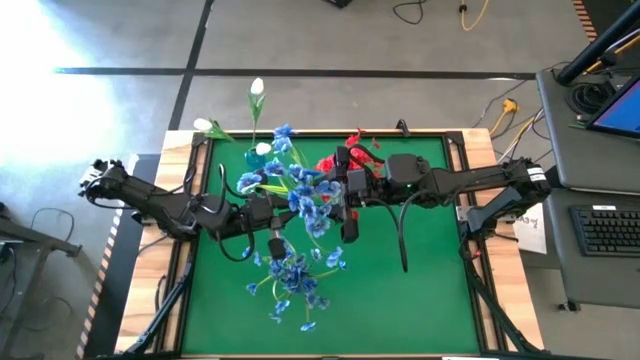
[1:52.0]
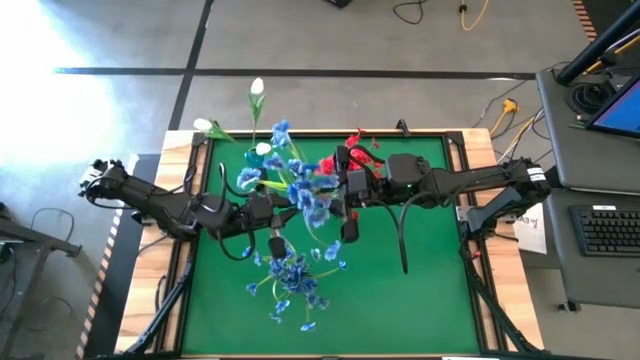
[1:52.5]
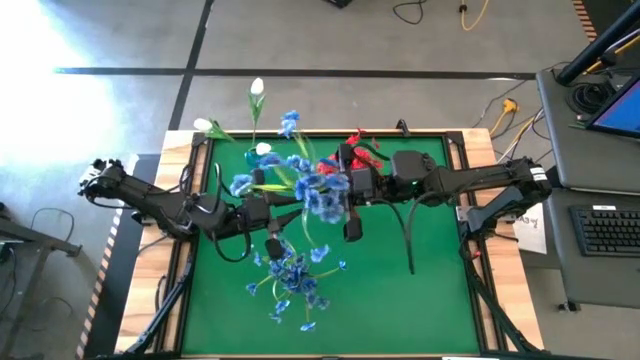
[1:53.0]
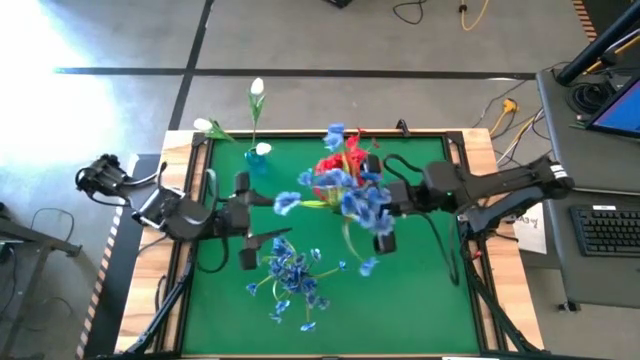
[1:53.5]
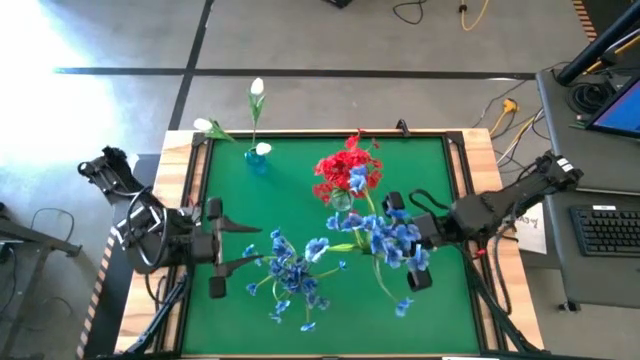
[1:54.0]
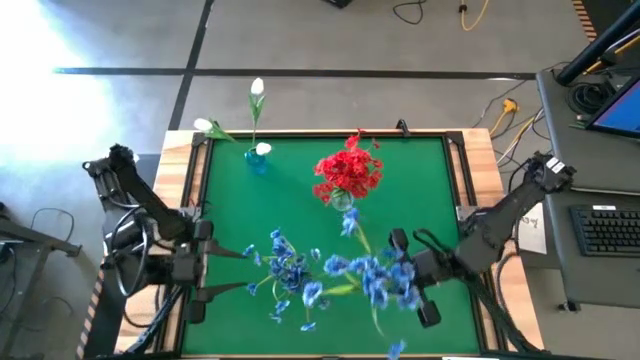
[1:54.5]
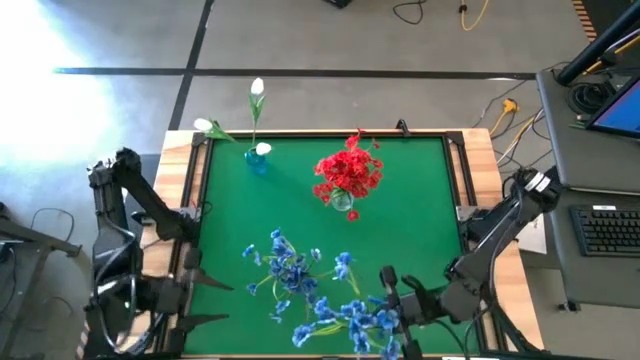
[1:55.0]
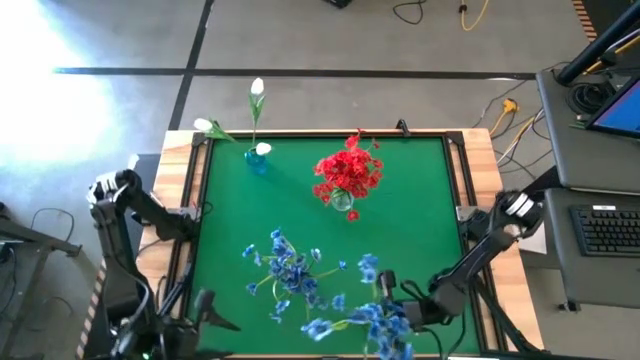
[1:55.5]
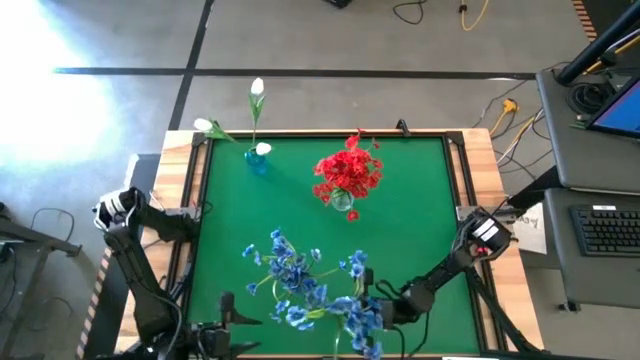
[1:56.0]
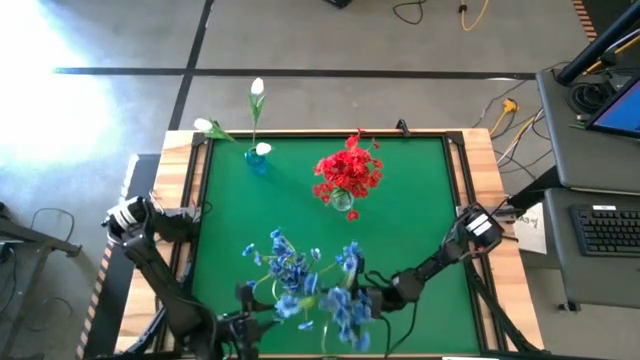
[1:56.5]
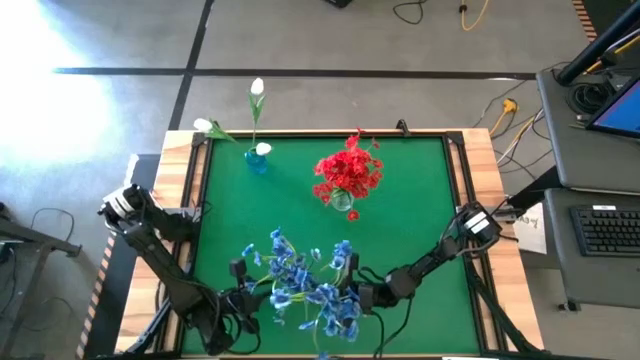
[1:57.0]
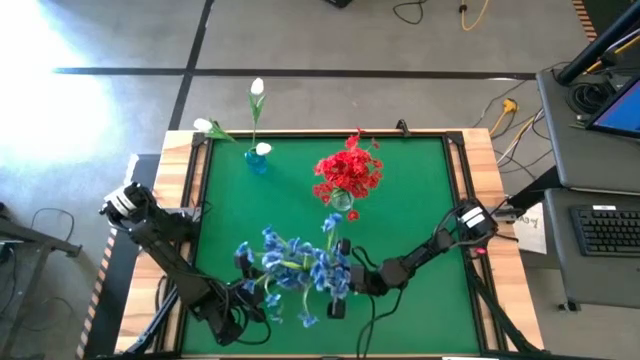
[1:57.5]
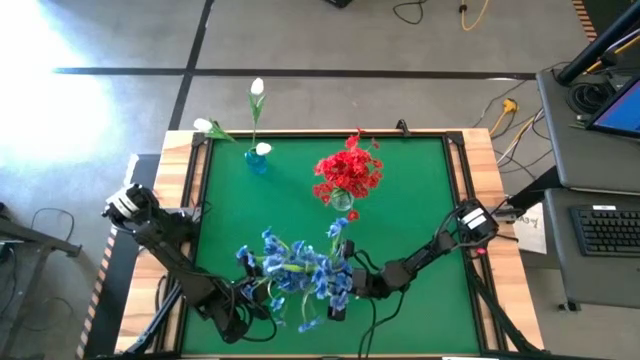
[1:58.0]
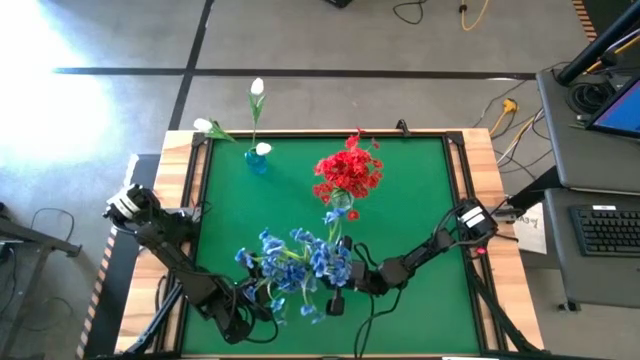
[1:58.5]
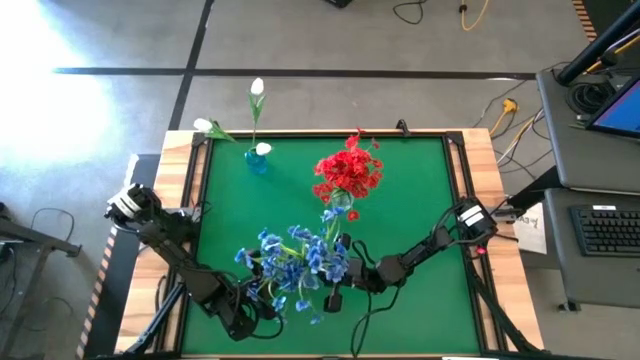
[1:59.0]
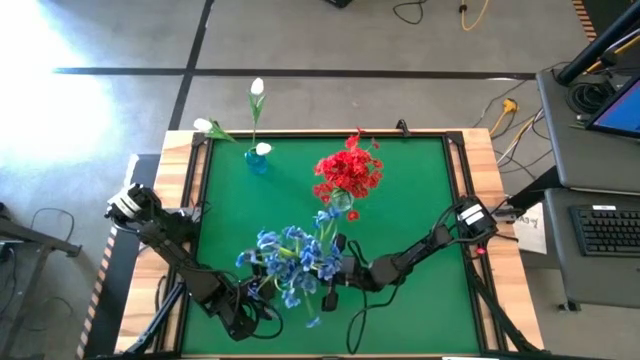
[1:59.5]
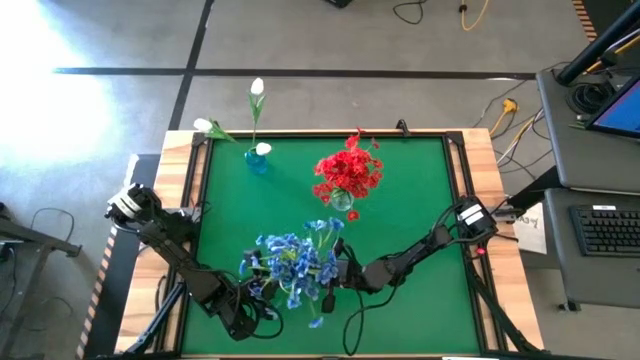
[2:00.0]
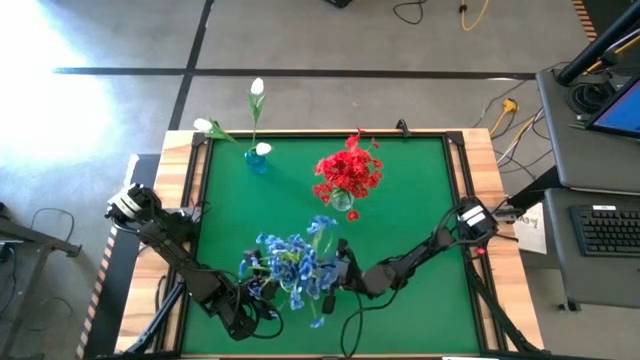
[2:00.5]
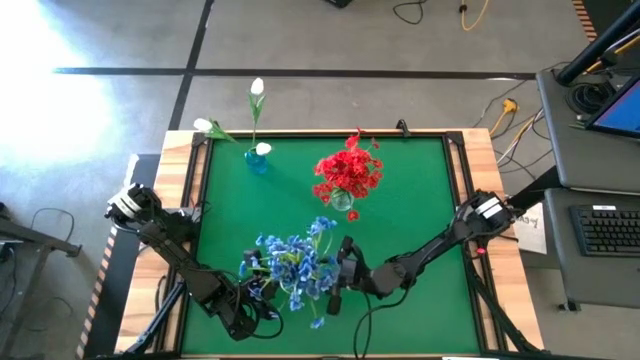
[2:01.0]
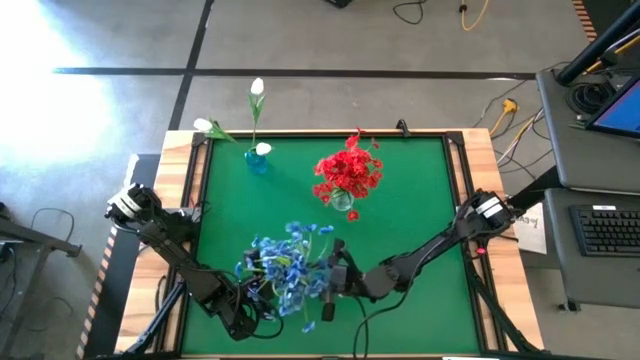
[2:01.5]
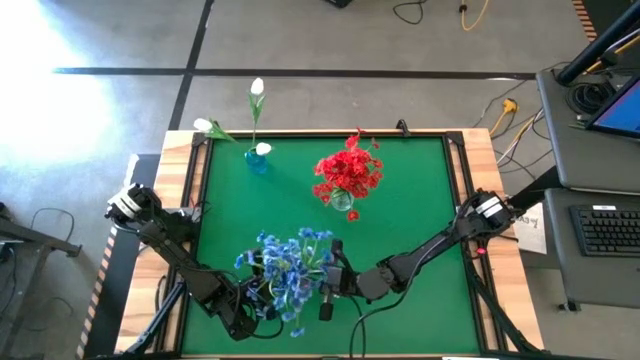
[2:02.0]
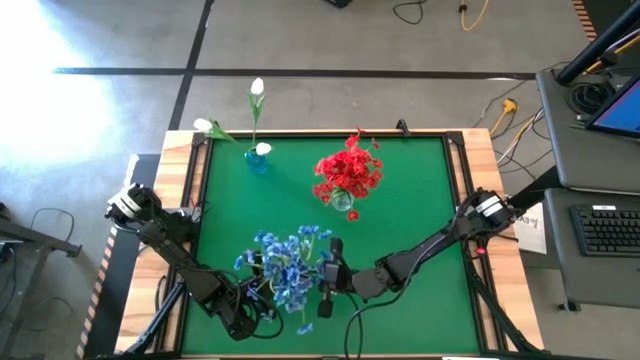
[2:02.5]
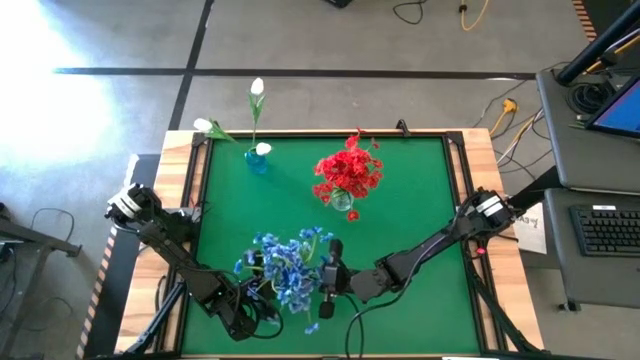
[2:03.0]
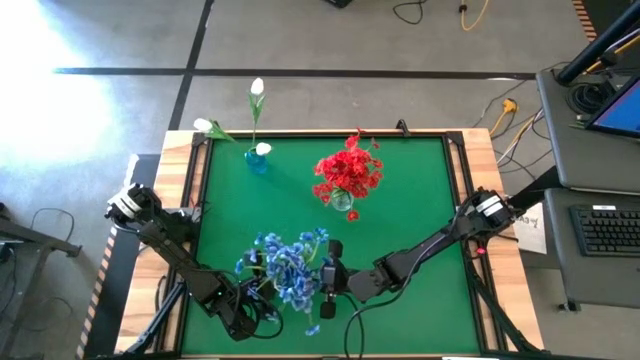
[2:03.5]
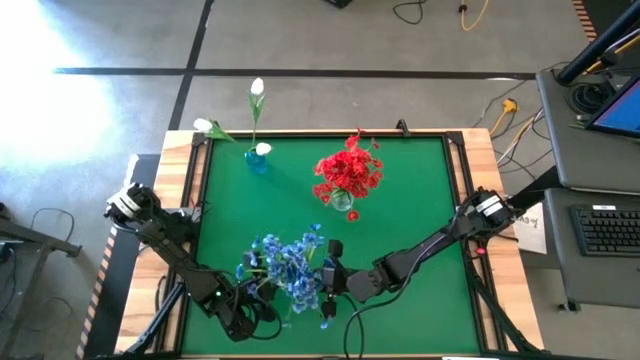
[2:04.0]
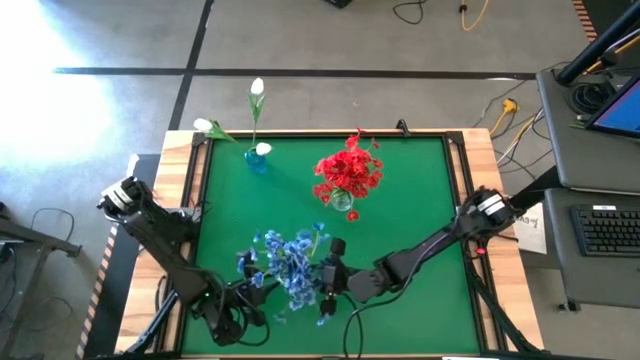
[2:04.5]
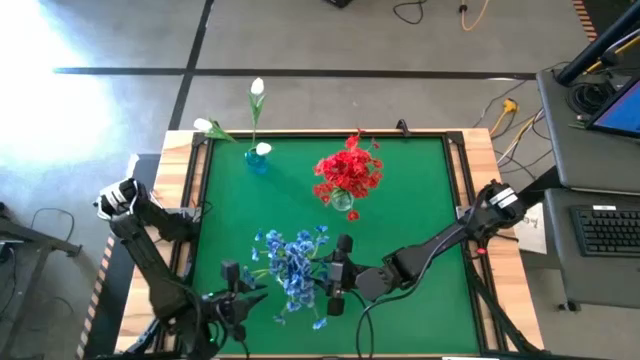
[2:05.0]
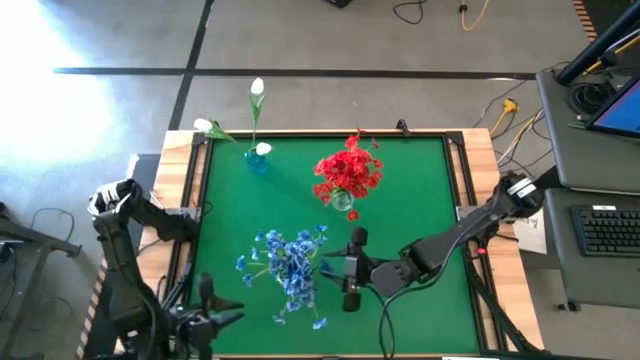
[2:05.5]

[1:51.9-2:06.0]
Task: Sort flowers into vase by color
Put the blue flowers into the violet vase

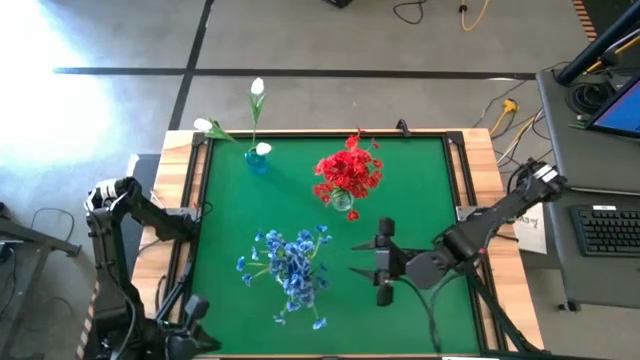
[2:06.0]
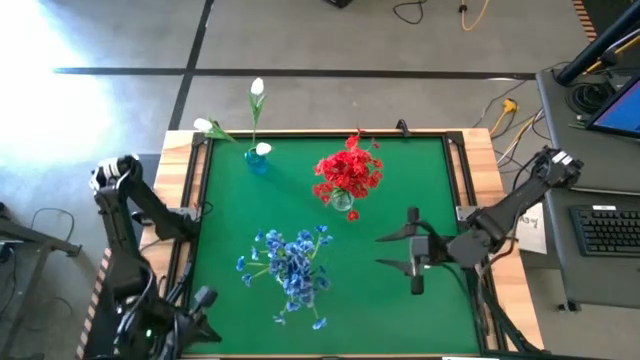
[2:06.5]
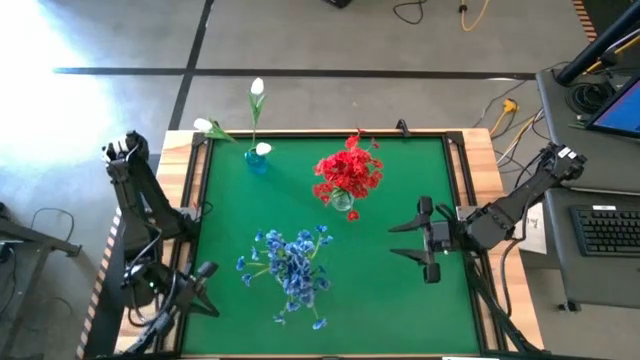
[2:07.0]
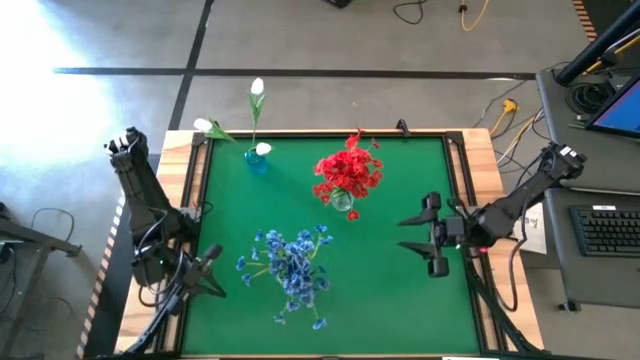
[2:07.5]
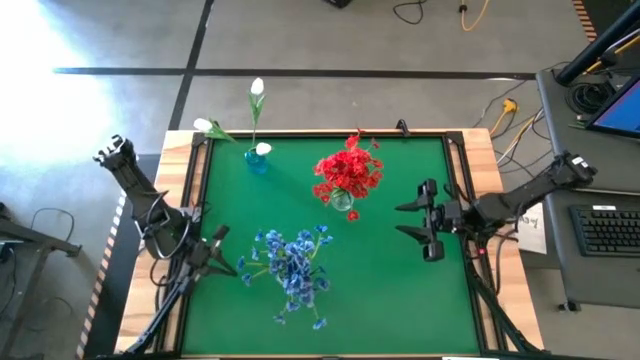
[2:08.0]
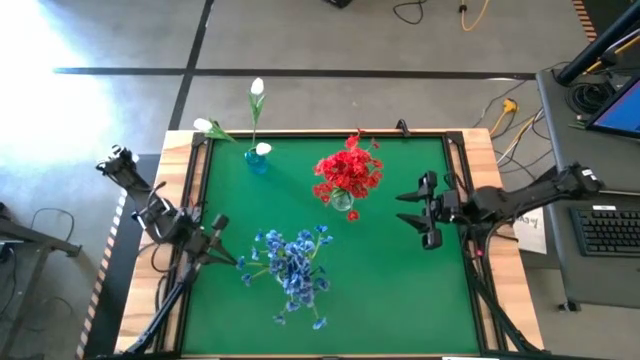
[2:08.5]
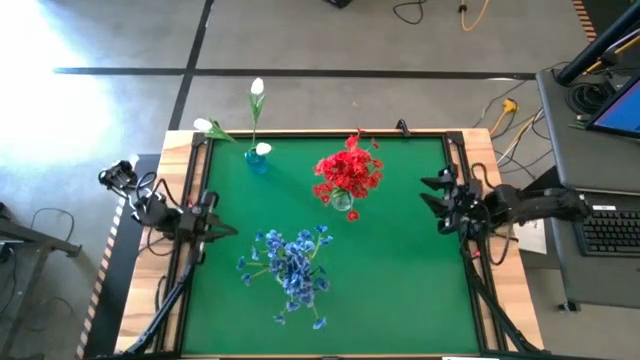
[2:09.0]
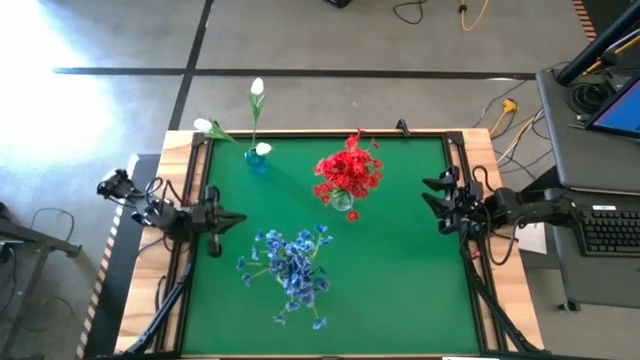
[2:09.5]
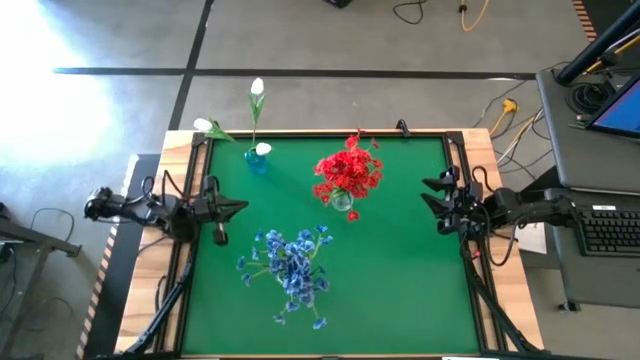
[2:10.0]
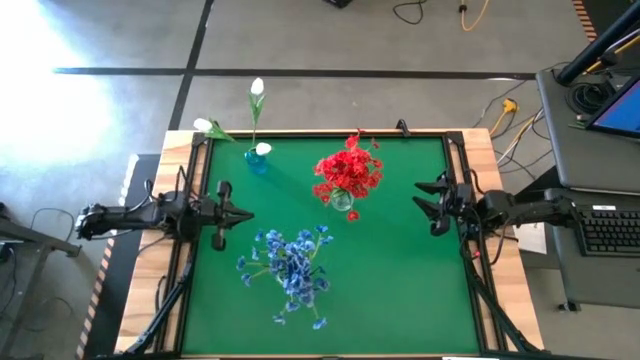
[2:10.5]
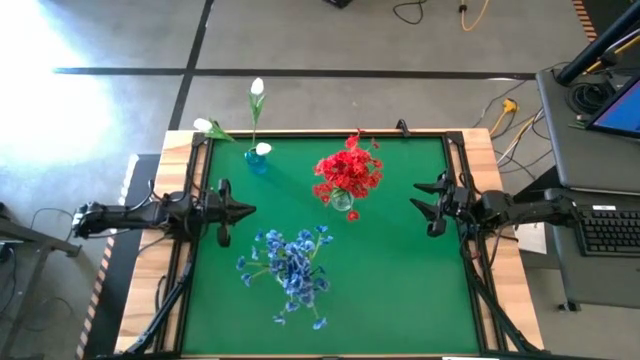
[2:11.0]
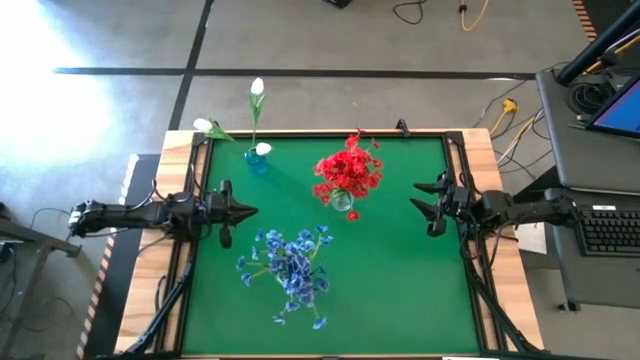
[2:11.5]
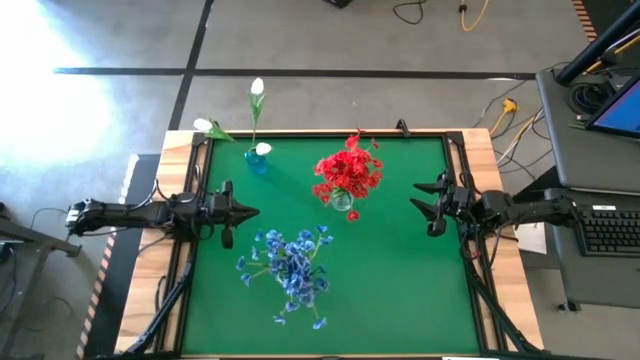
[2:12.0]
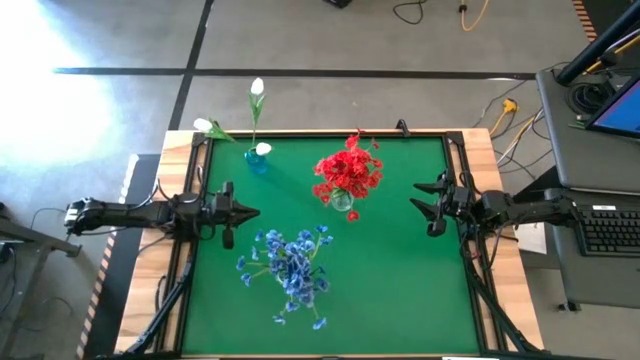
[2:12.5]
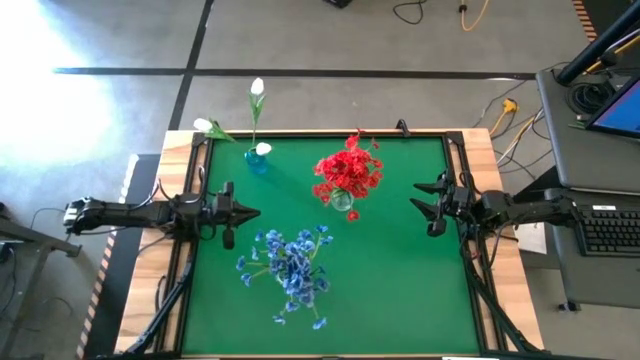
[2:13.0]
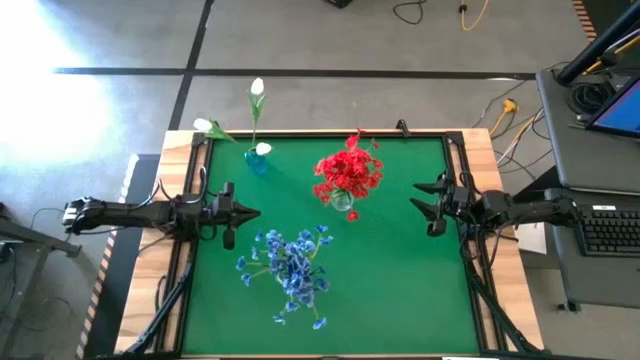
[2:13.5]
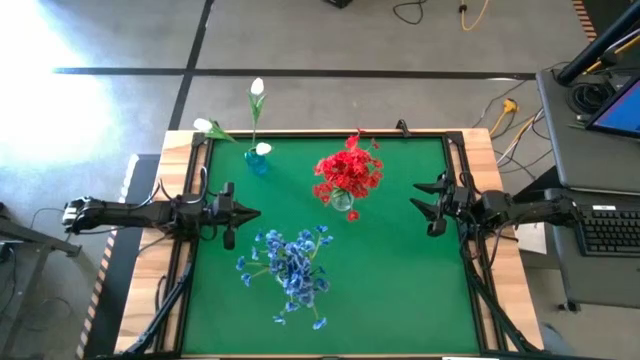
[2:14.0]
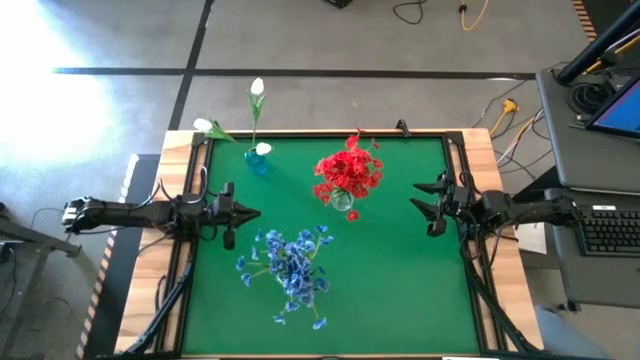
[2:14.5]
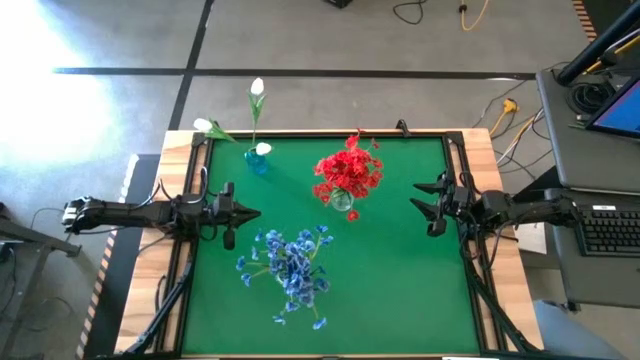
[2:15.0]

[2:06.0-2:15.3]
Return to Home Position
